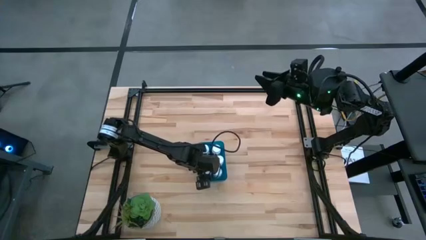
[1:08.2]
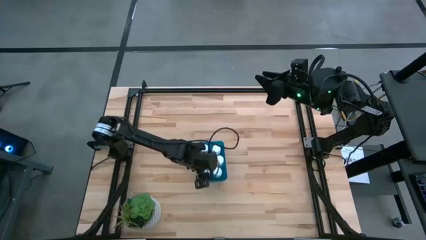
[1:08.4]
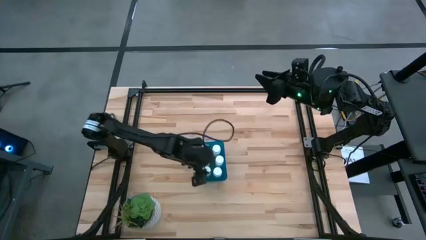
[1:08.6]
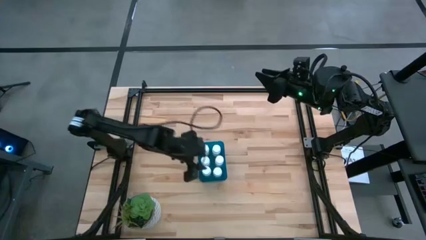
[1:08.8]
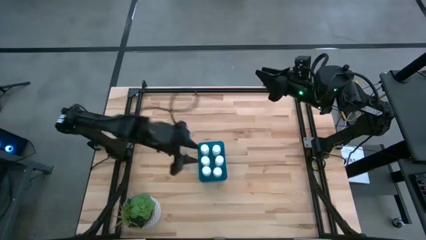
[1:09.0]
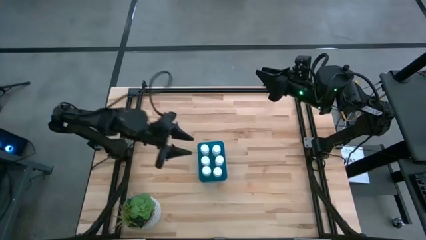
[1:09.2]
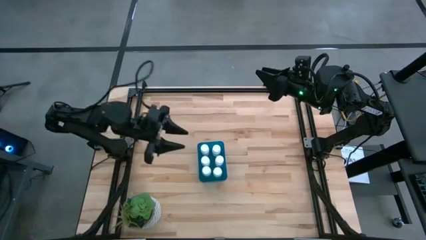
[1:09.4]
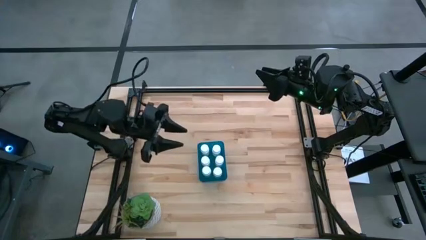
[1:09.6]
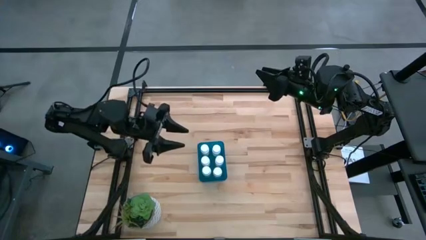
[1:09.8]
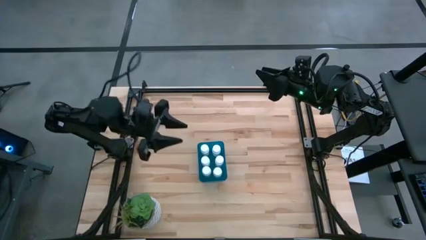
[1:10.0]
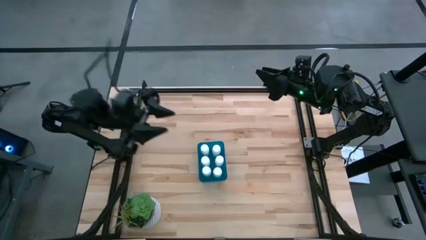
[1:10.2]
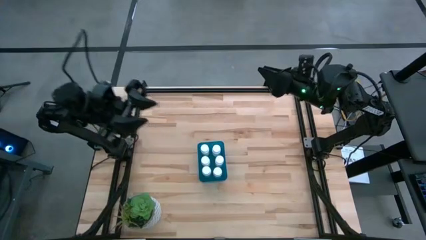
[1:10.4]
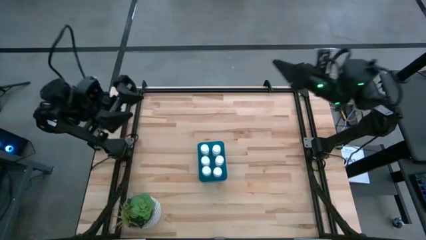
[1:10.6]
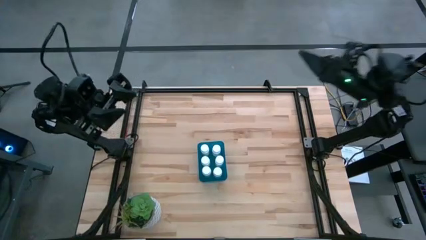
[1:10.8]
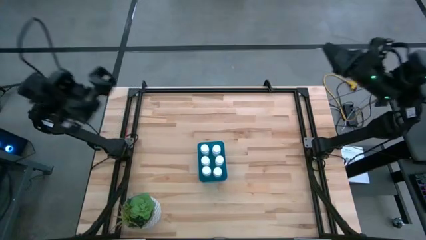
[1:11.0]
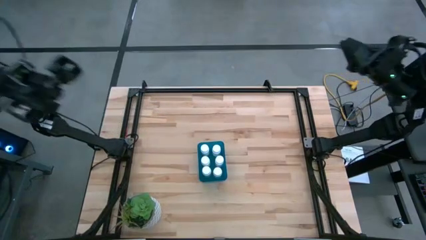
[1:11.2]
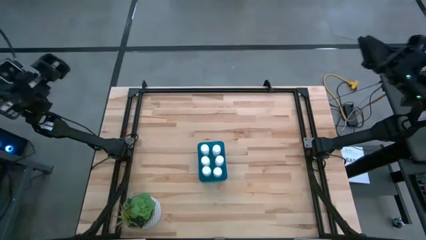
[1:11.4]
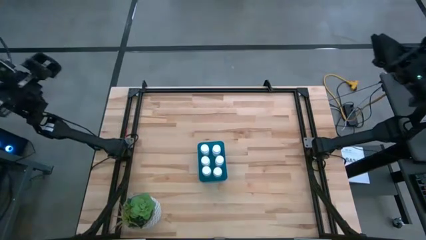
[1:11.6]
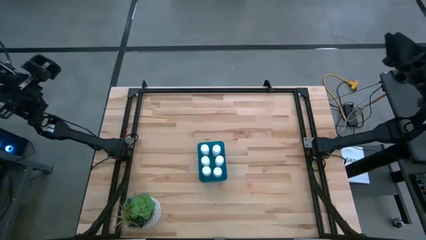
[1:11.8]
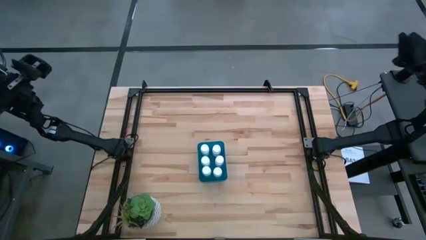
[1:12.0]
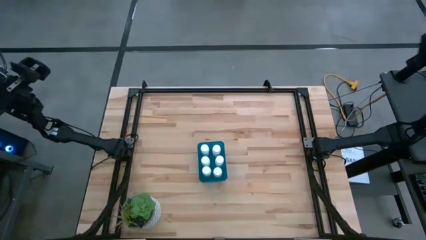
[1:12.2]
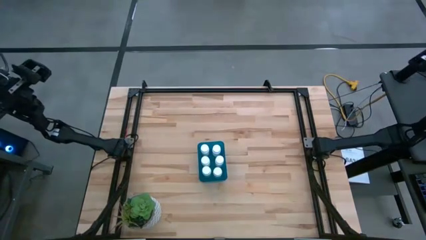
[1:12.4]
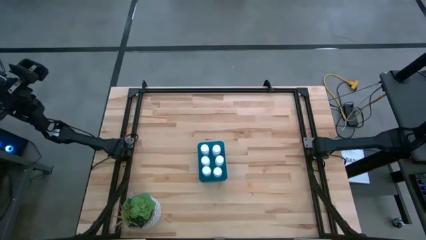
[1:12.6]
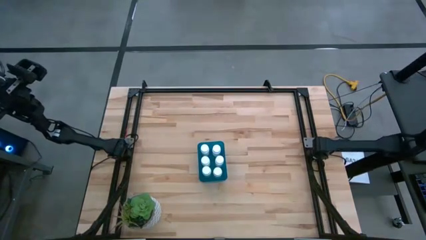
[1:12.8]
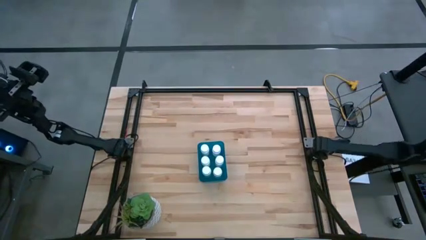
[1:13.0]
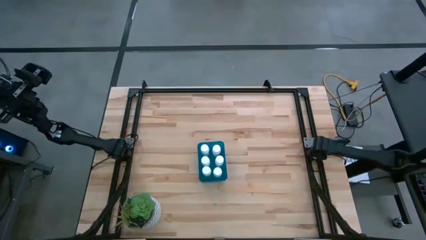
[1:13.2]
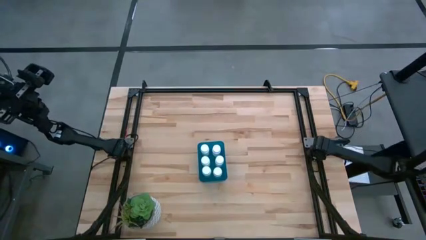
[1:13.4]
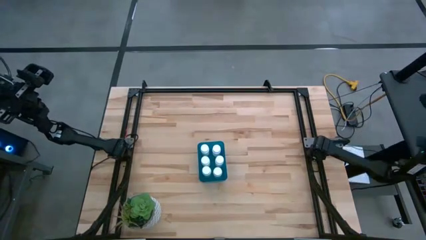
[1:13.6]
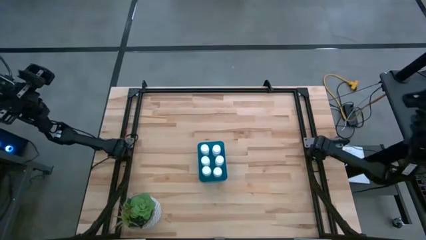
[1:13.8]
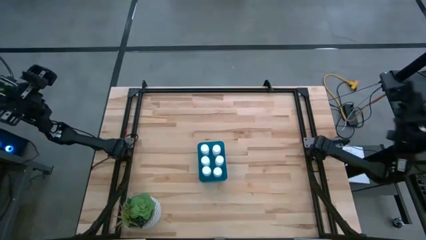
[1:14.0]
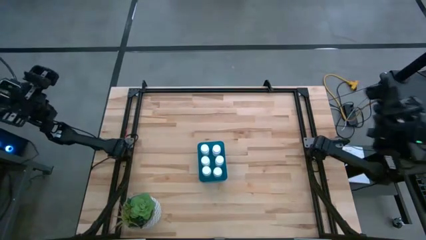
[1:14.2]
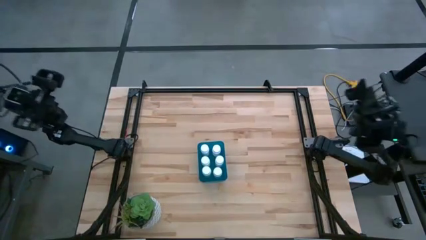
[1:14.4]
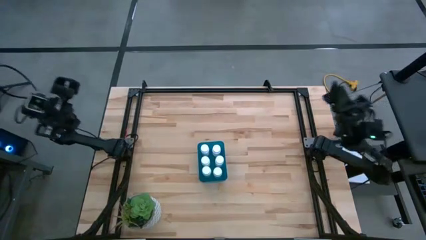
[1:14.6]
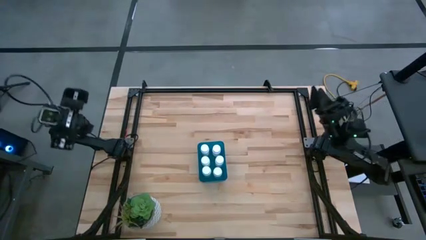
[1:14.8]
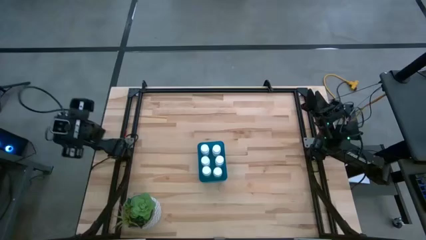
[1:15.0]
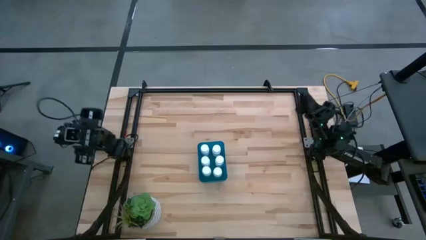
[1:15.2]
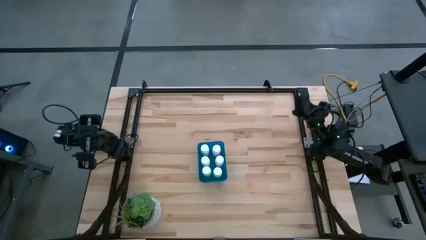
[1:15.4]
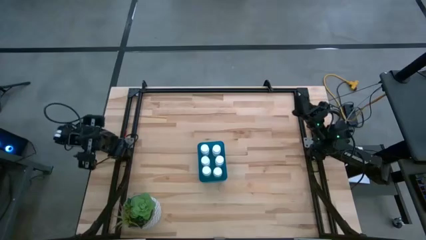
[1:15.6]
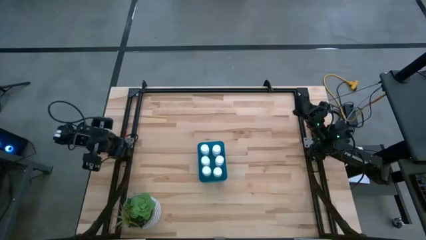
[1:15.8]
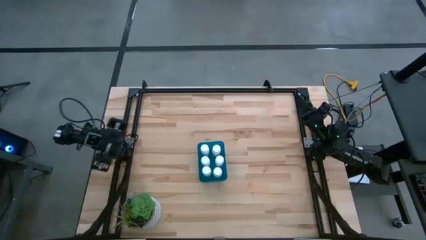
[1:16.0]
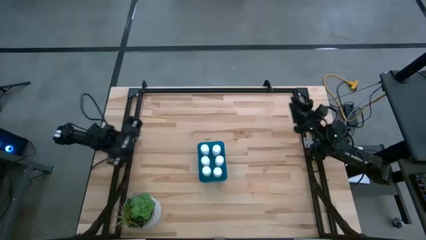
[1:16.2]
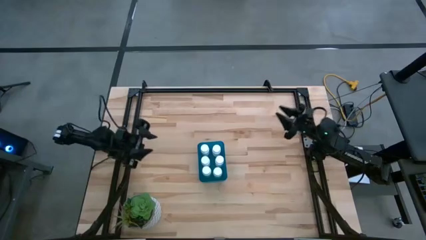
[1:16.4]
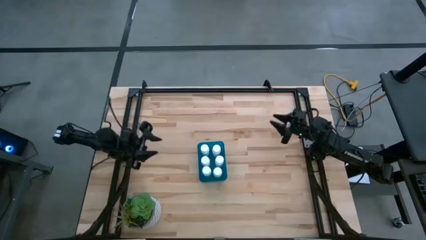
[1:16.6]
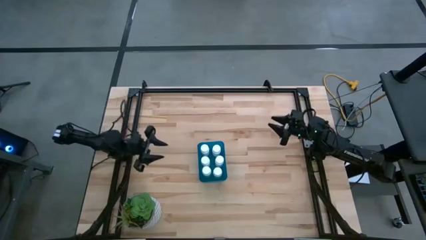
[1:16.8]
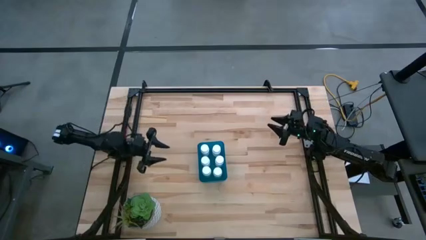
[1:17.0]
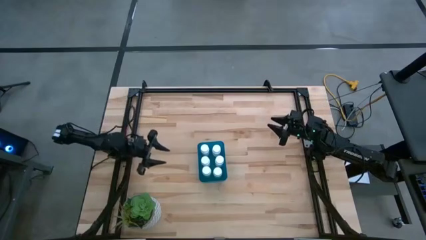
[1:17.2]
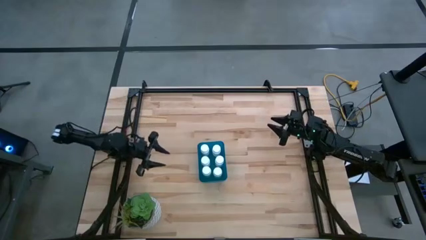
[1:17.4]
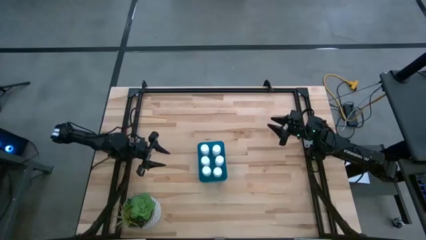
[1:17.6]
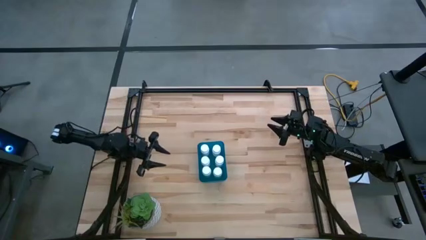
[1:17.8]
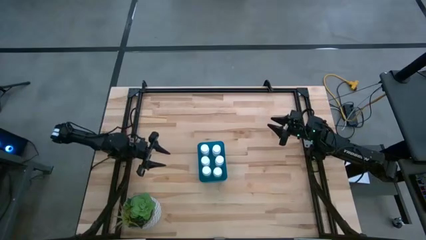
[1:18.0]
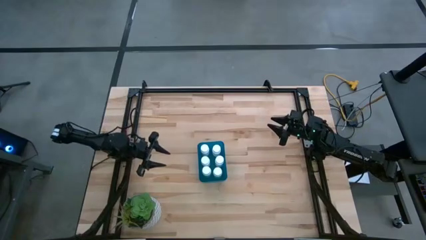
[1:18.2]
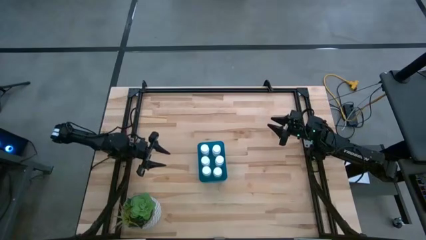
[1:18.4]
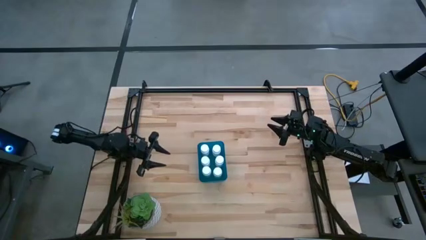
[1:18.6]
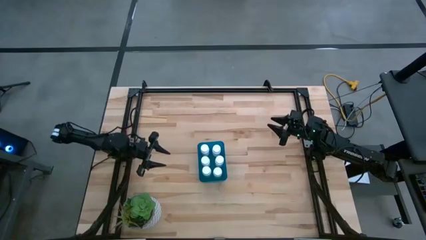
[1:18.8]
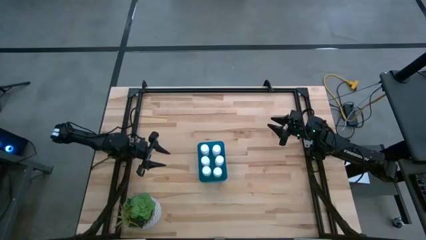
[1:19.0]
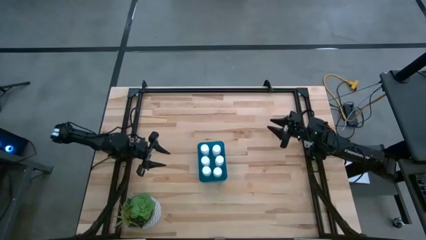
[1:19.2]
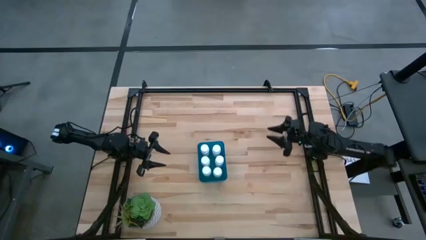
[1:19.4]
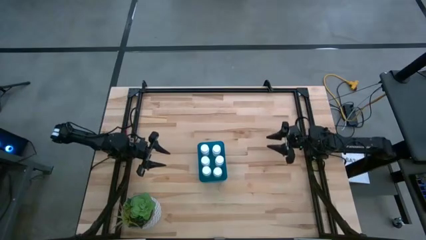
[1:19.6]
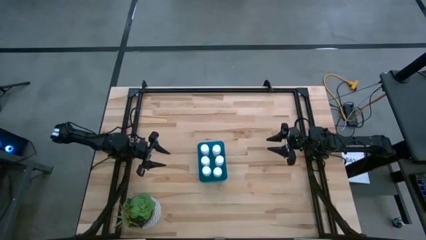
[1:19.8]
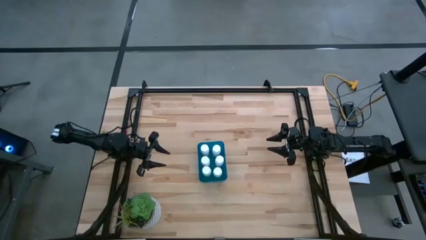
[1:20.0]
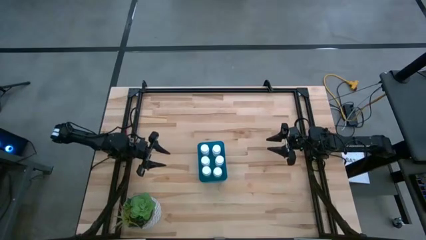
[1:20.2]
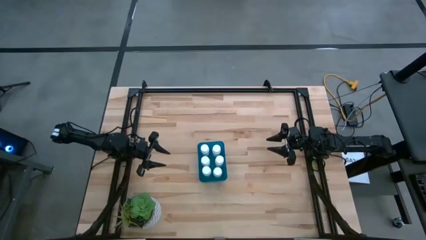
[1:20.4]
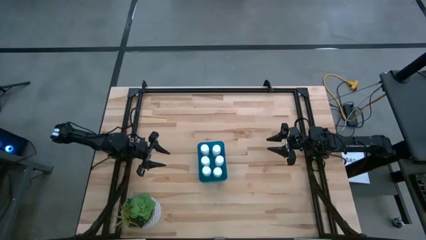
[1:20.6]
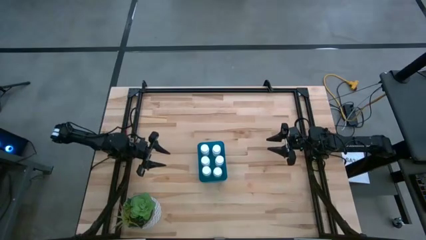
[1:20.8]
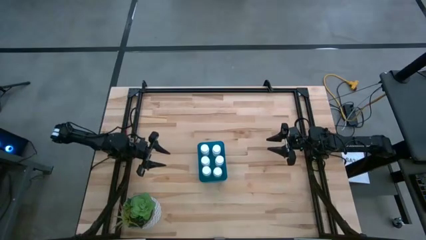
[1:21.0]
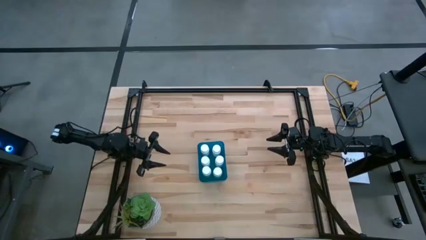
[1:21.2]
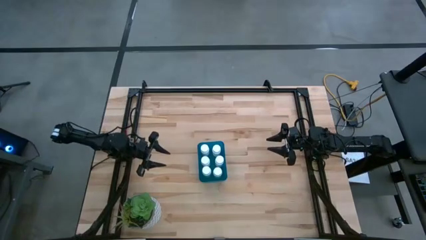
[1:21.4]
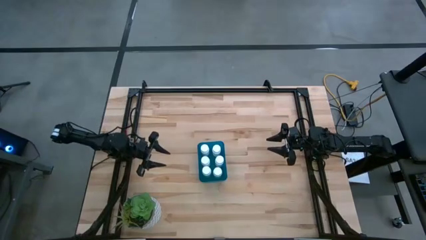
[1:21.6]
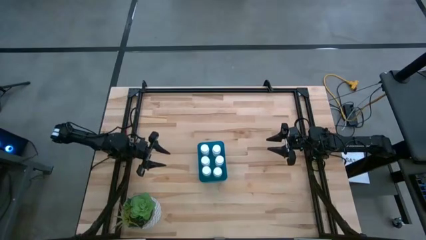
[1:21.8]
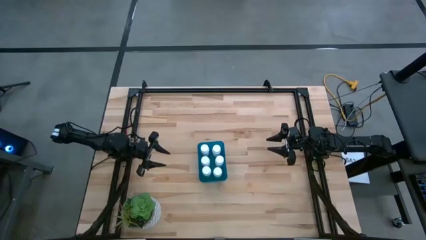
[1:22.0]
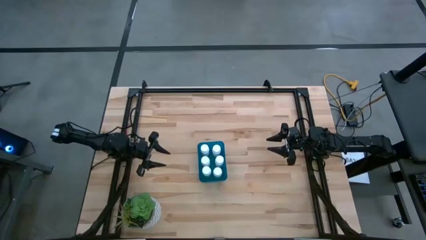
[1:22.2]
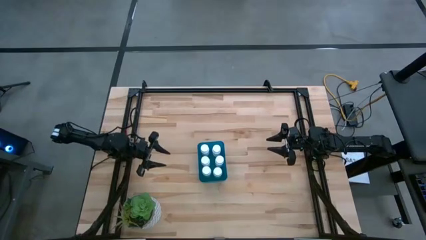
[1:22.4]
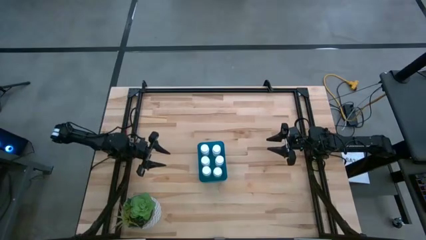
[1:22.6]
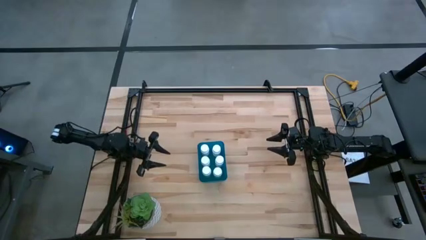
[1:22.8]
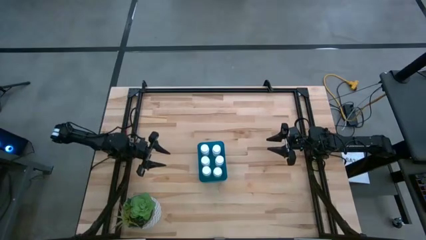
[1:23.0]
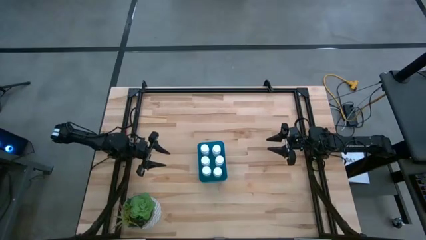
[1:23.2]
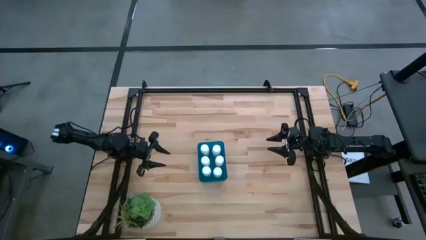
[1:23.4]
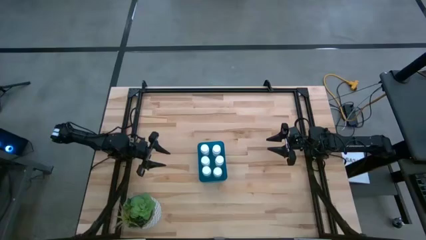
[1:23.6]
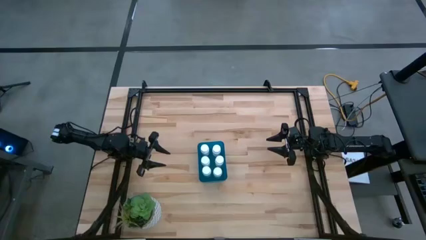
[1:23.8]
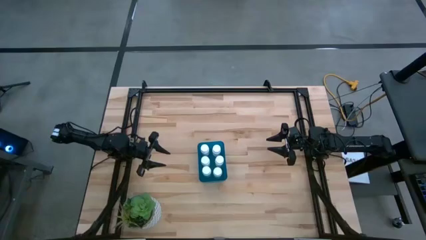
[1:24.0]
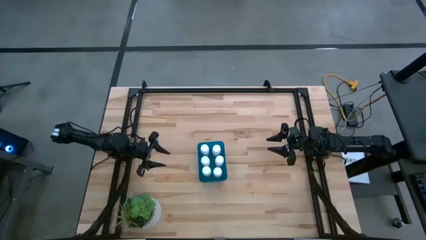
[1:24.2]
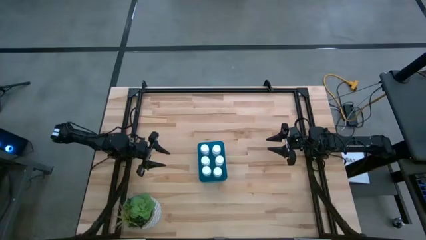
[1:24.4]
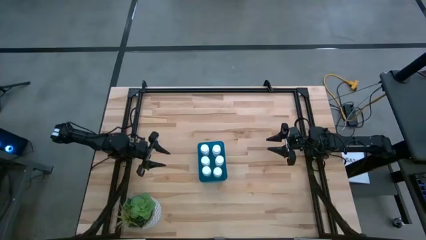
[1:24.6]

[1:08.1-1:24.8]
Task: Pick and place pill bottles into a basket
Return to Home Position
